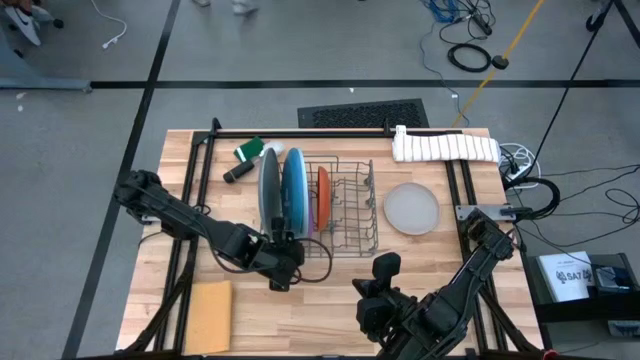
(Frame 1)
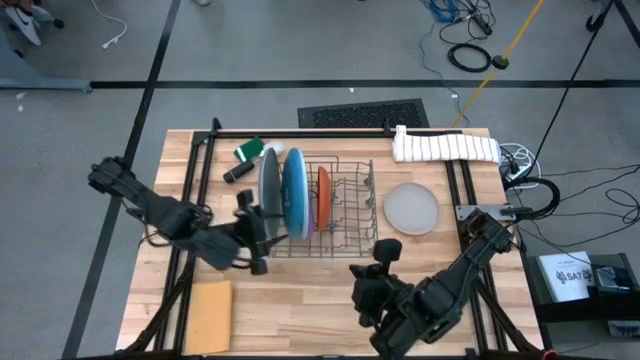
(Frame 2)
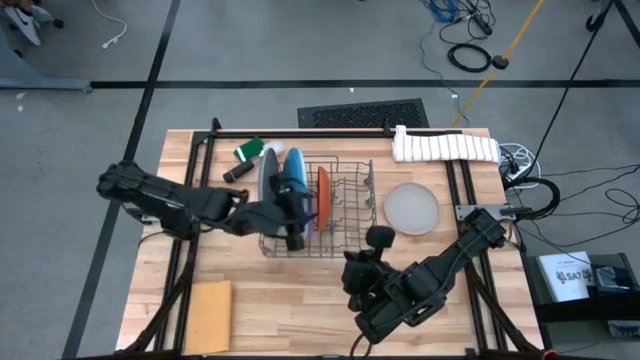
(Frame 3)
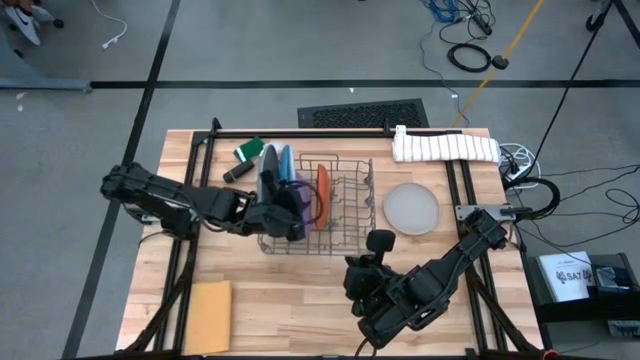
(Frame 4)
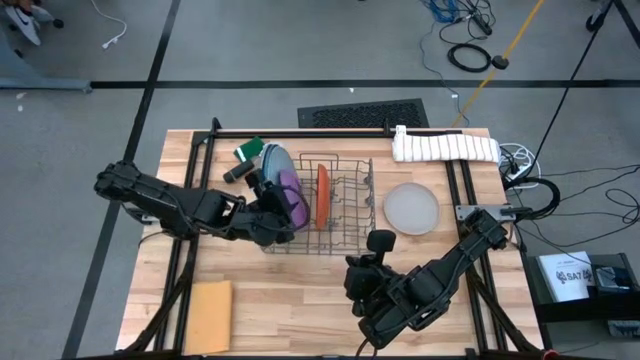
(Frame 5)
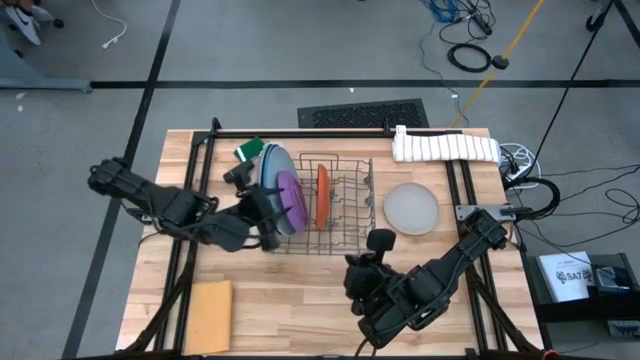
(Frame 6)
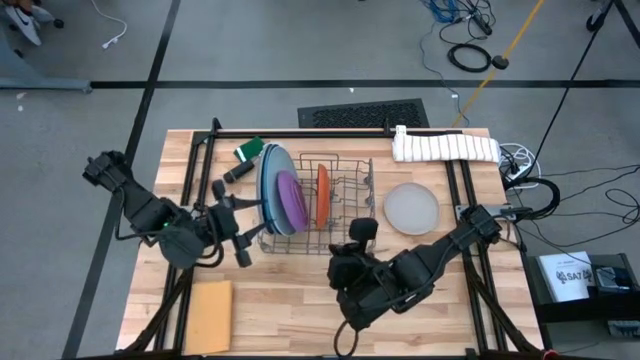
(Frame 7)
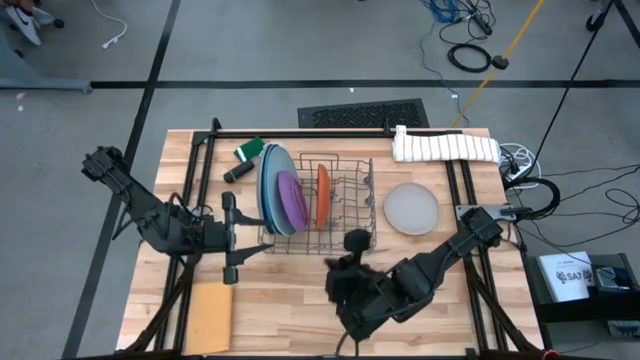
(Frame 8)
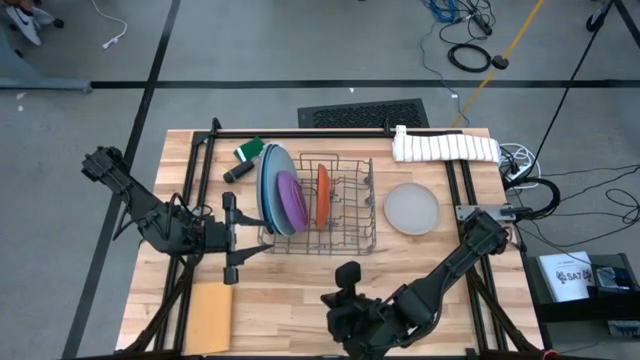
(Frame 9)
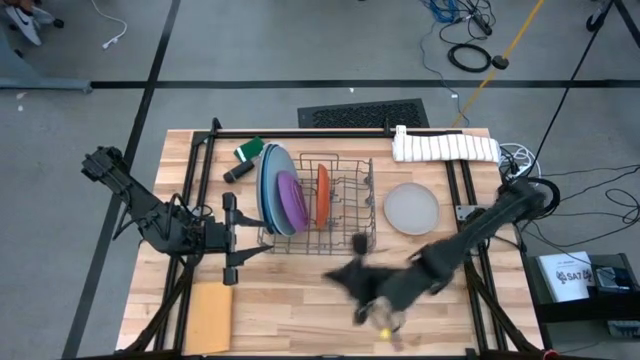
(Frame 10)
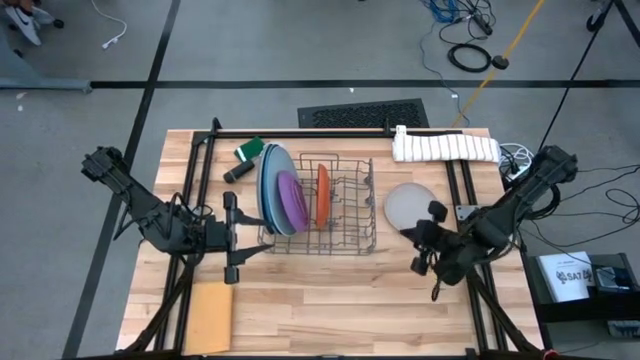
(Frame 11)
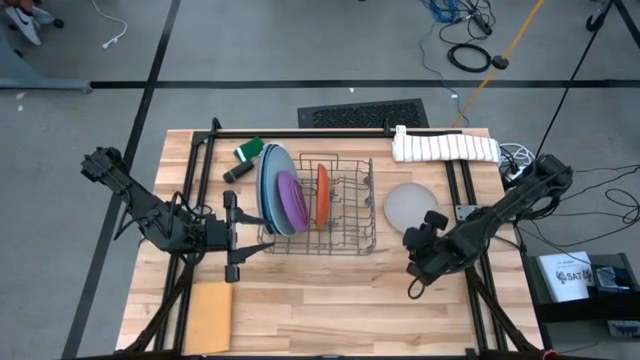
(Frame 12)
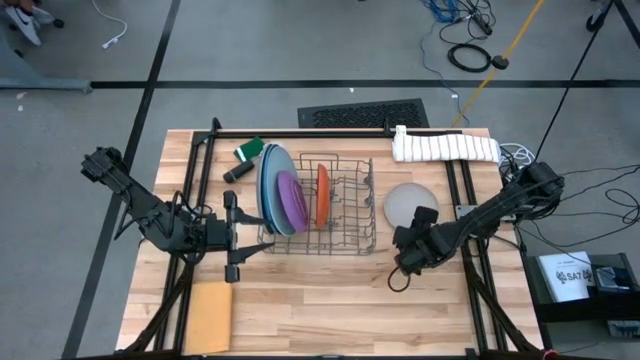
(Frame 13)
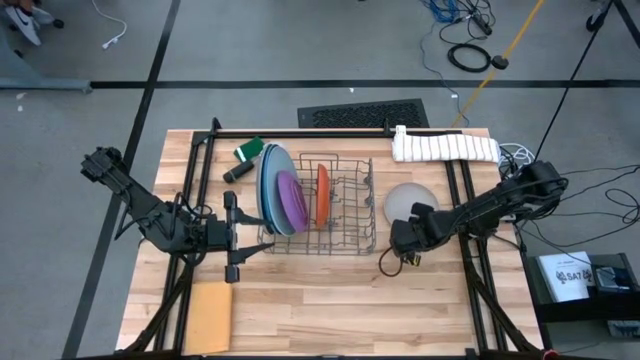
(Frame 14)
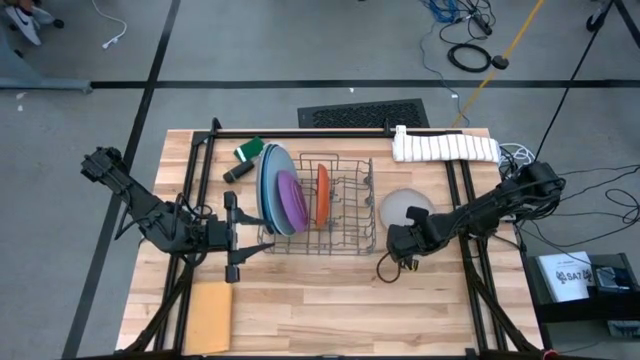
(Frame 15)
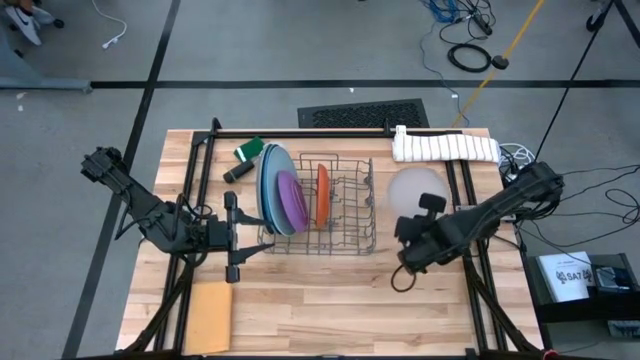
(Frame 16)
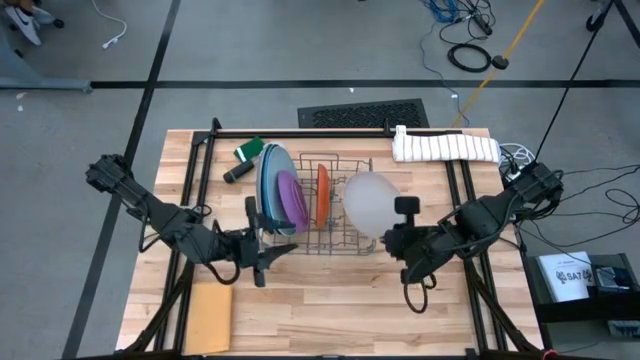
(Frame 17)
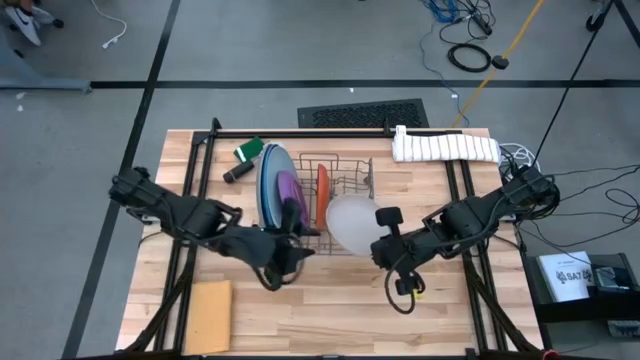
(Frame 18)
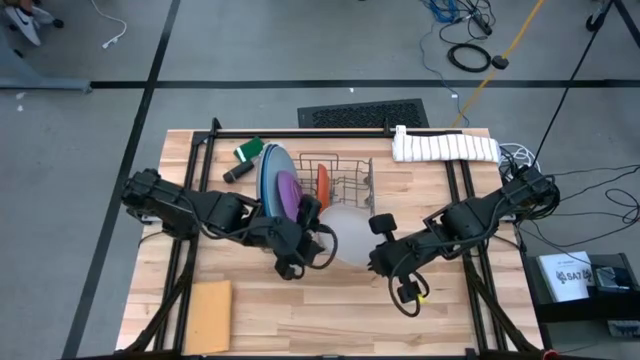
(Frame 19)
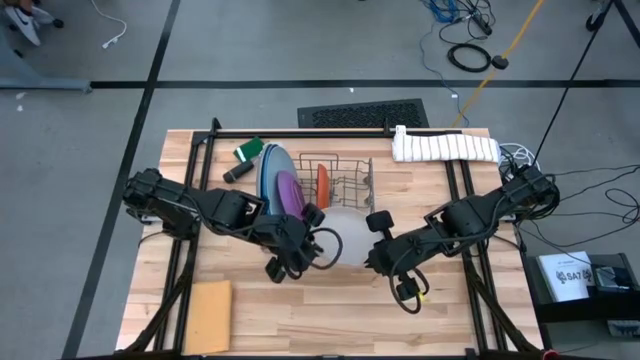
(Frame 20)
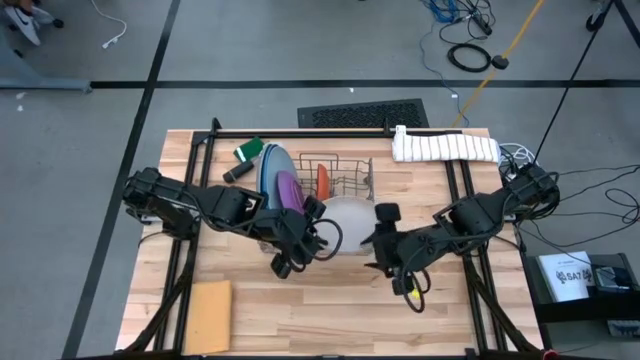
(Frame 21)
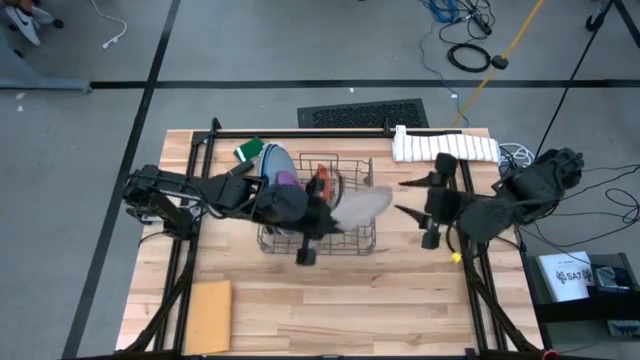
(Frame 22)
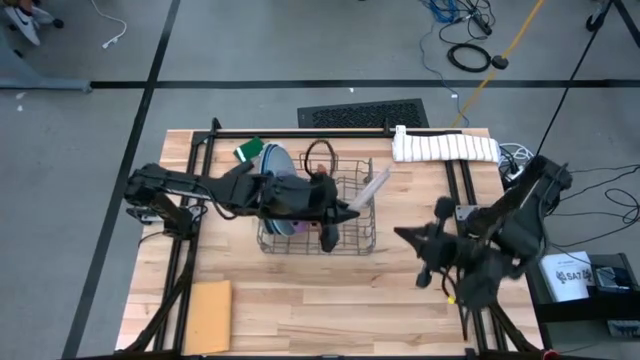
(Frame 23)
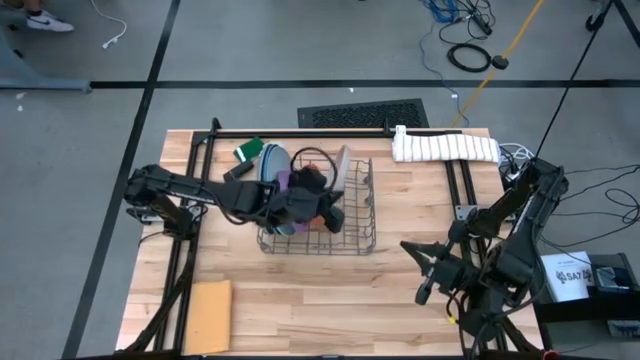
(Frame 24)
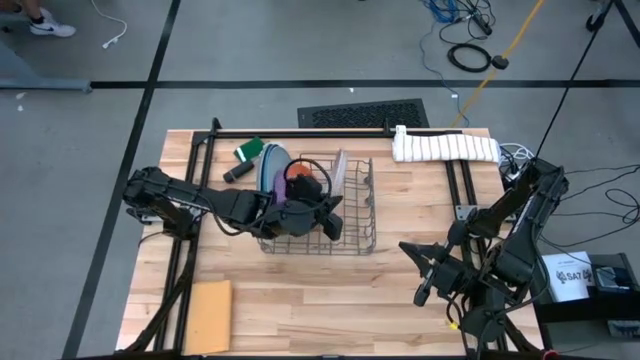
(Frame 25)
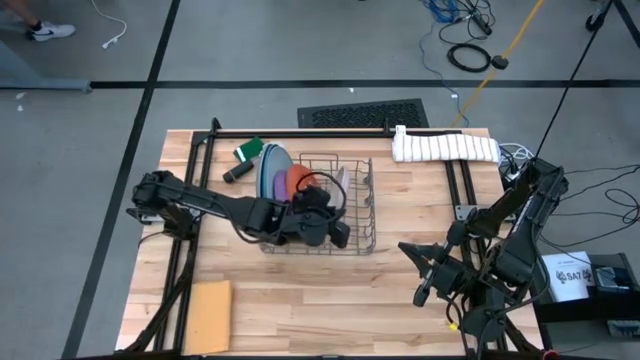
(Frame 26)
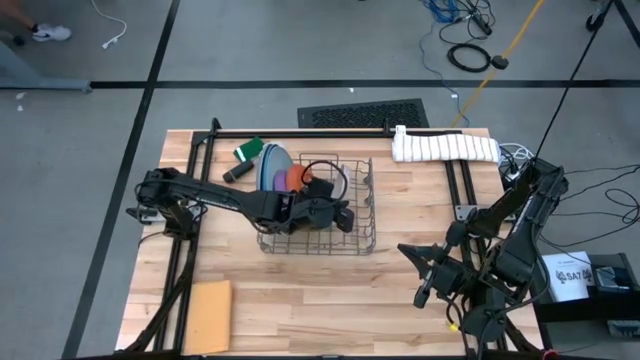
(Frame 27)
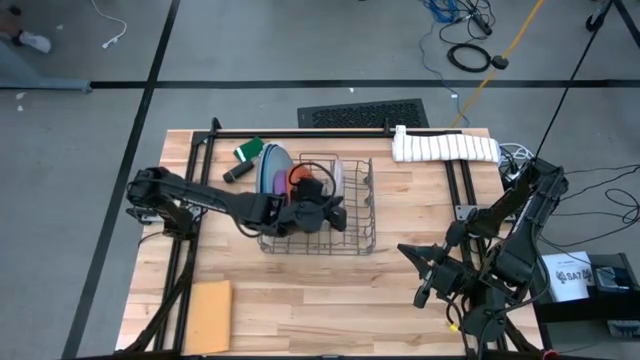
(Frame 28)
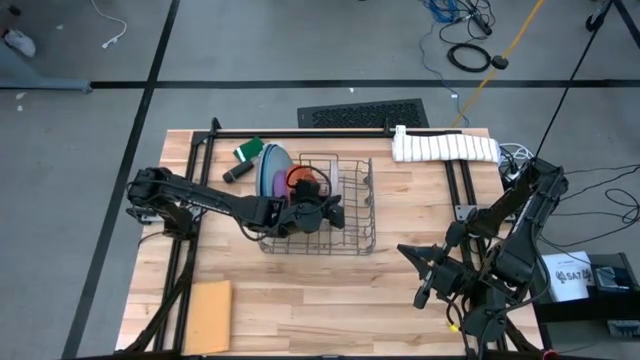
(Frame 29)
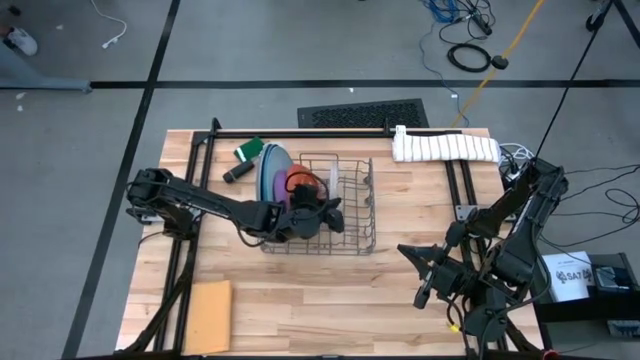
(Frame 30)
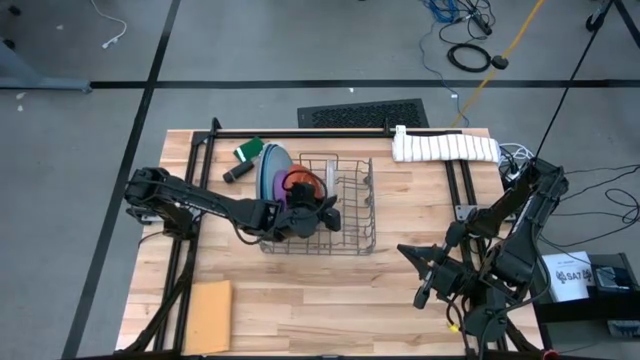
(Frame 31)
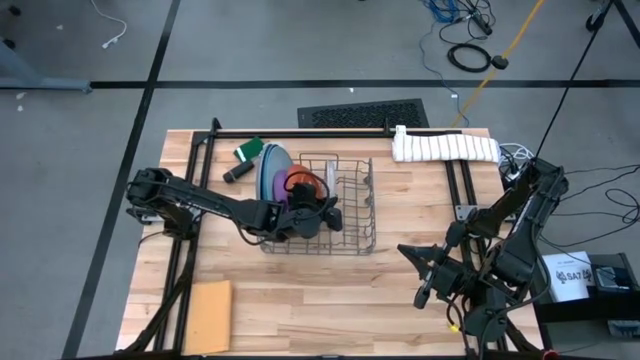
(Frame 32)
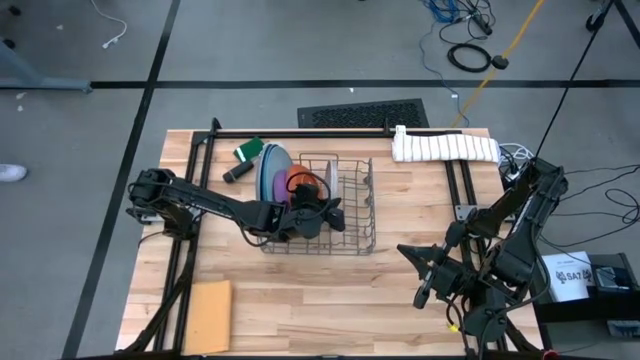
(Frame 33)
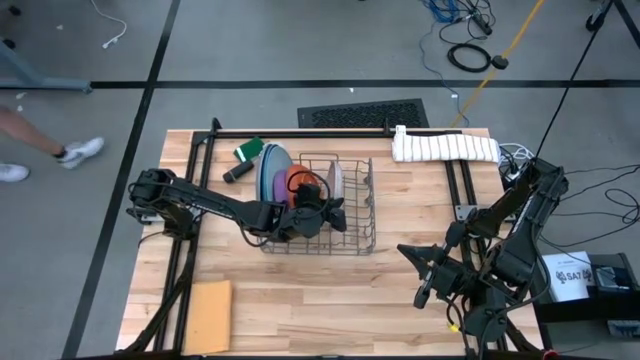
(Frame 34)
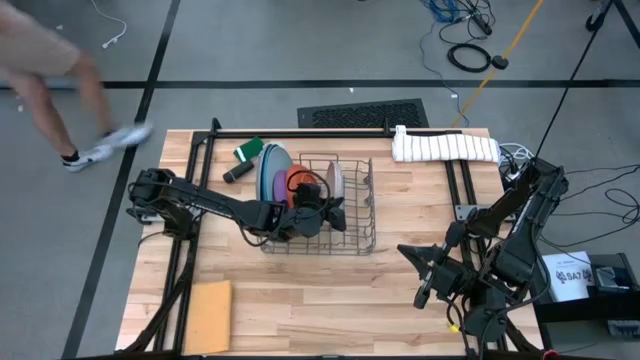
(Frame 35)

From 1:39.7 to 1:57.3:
Task: Sort dishes
Put the white plate into the green dish rack
